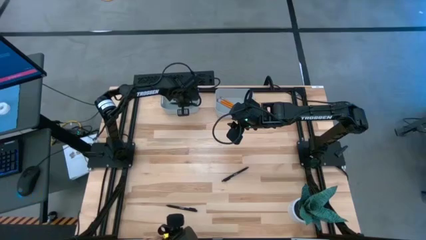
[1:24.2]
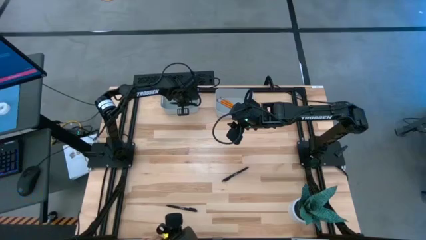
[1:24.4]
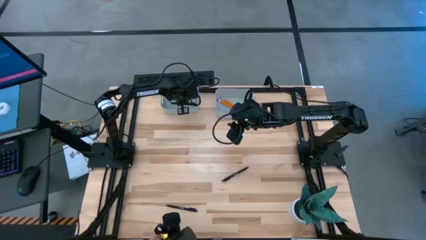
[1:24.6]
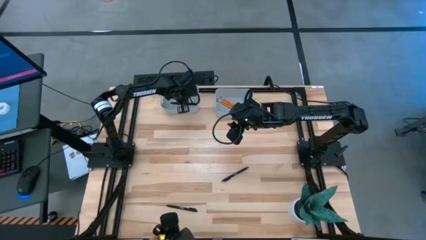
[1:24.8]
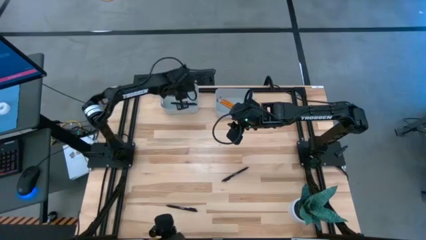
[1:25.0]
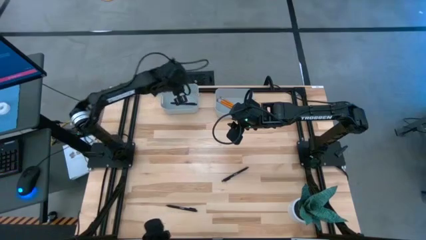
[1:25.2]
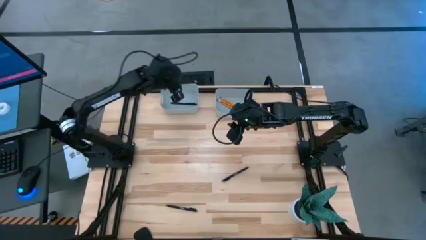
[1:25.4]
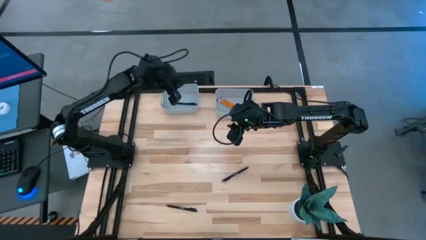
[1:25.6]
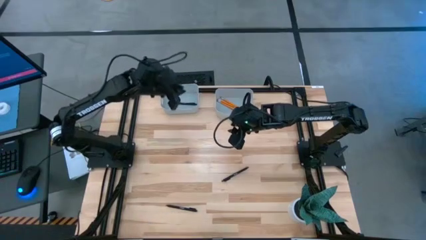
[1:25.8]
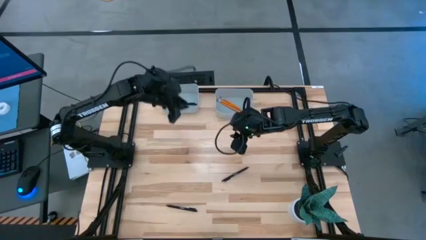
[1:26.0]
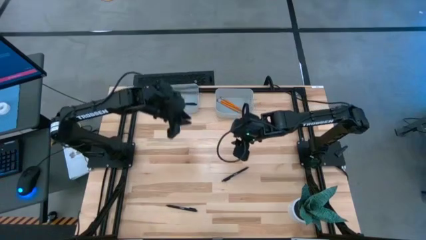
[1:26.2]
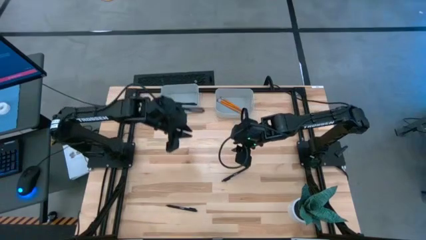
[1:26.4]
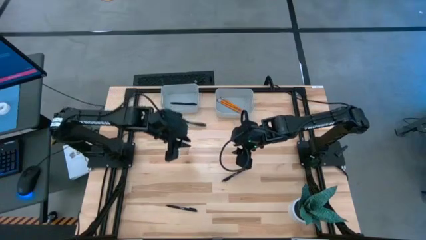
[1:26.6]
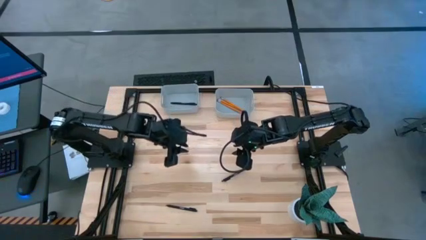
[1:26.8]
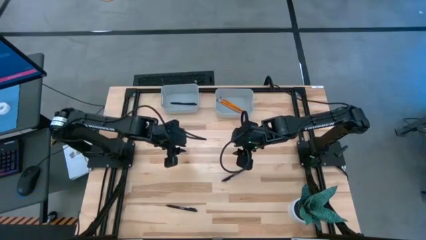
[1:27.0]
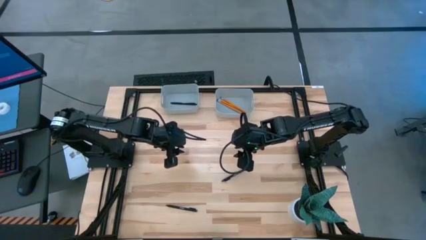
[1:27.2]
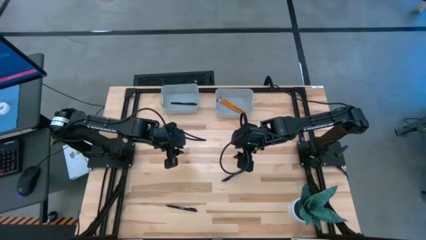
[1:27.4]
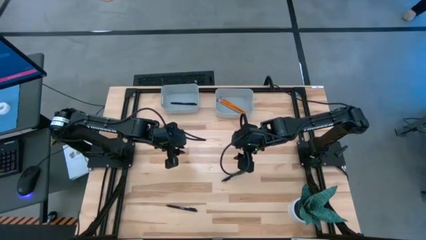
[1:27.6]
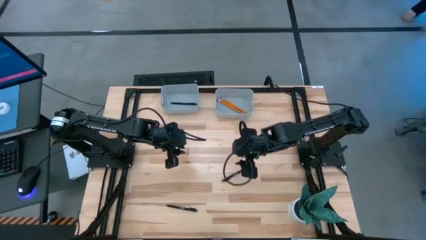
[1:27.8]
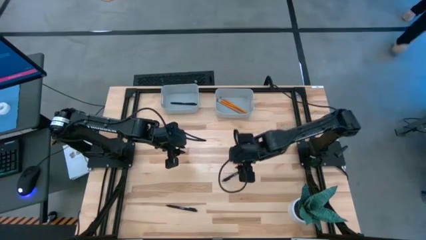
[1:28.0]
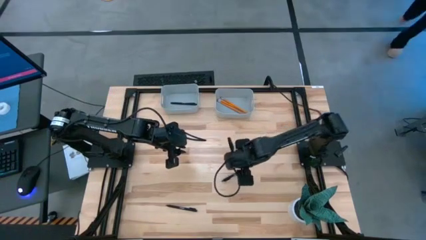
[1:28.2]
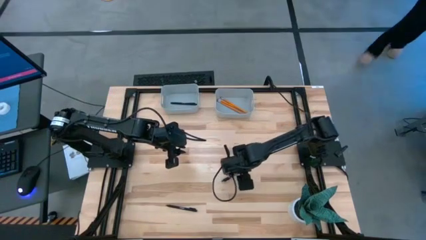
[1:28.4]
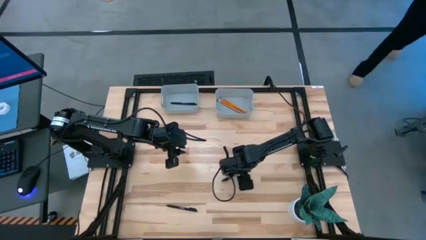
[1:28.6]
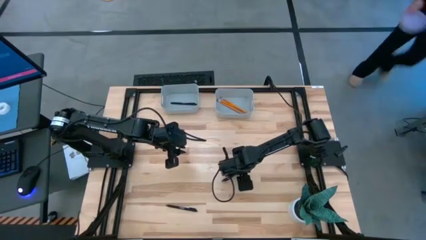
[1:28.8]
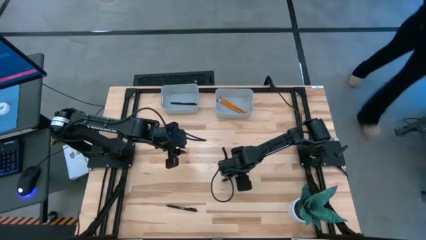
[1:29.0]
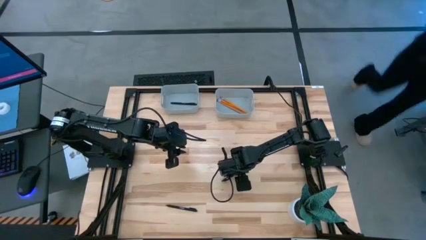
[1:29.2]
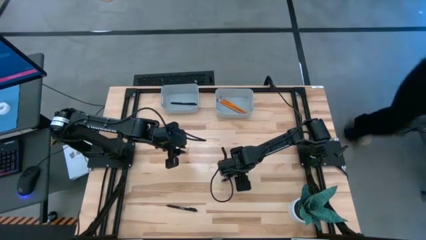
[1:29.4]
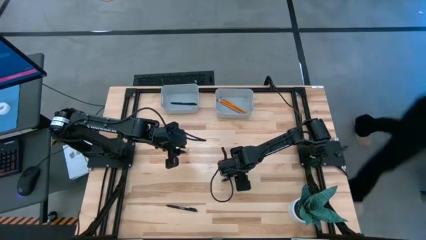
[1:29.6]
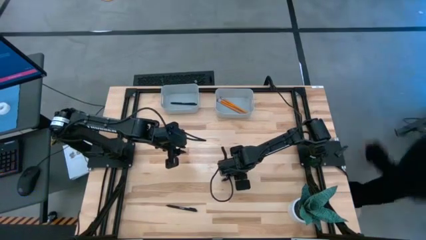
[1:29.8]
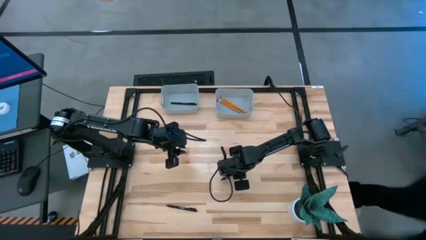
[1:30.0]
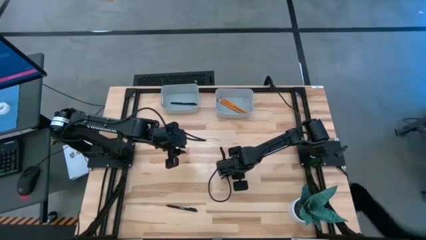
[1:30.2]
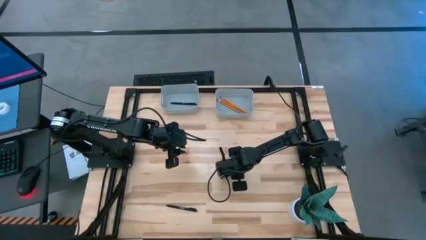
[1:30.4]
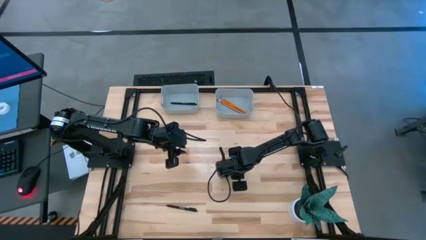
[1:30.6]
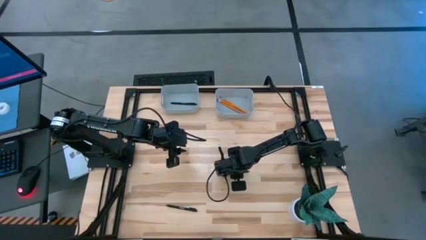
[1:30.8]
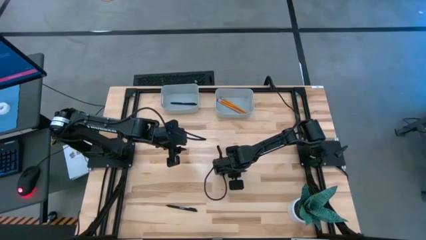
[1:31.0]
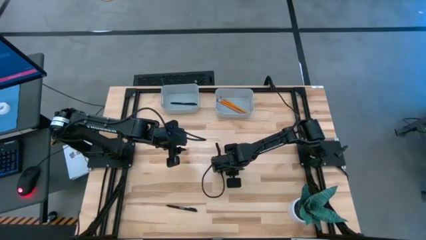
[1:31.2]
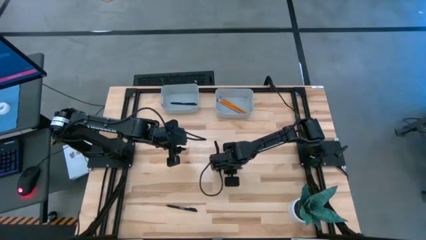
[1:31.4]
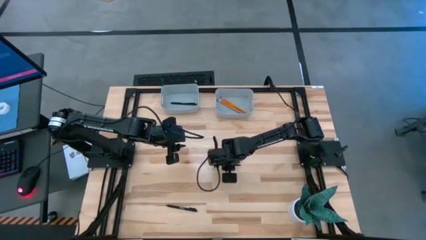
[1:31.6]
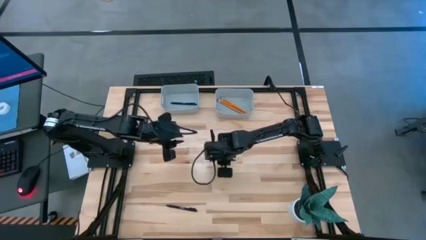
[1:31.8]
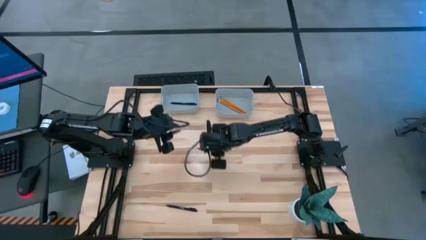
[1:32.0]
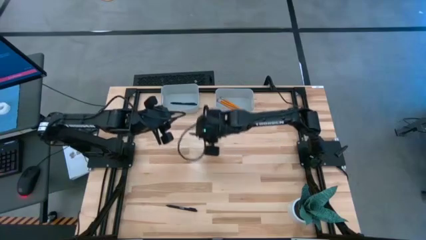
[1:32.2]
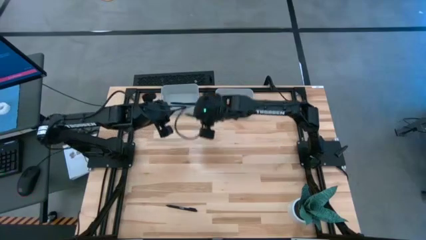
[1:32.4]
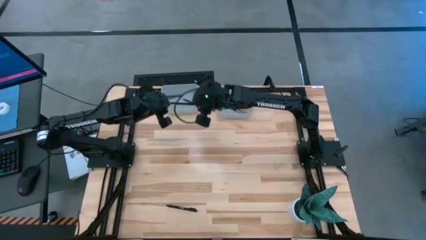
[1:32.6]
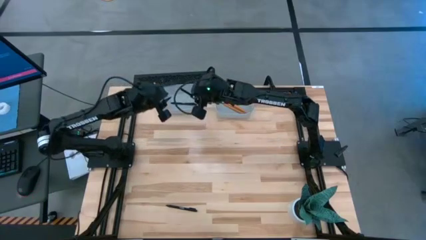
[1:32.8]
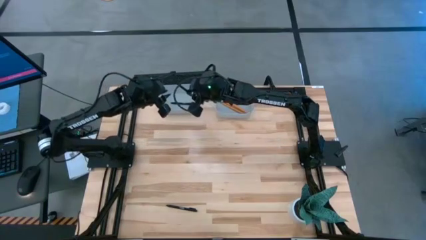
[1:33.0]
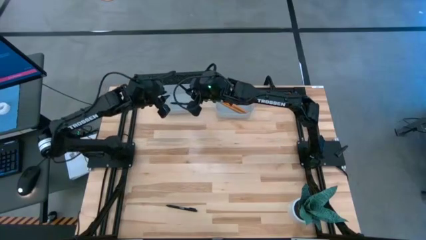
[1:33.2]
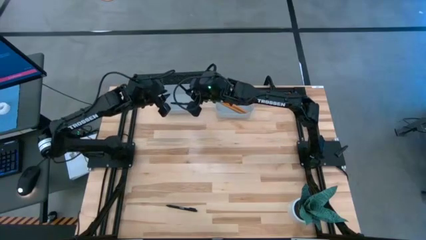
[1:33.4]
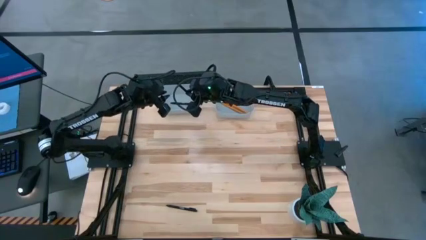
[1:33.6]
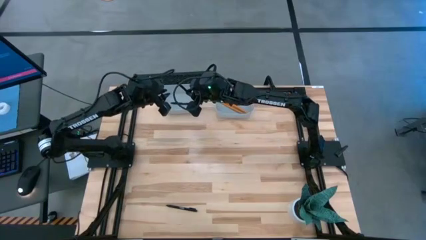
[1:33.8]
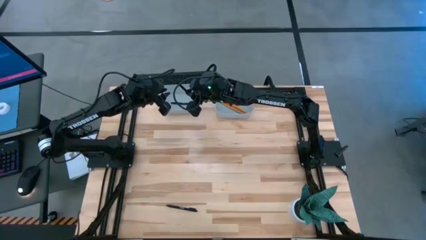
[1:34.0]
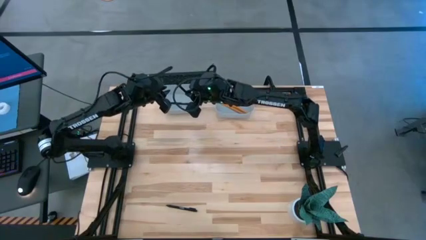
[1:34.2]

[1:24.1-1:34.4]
Task: Sort pens & pencils
Put the top black pen into the left gray bin

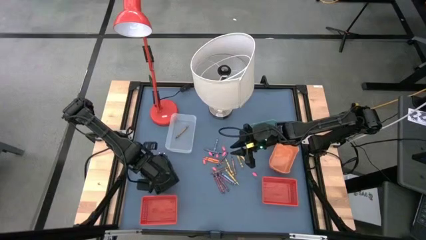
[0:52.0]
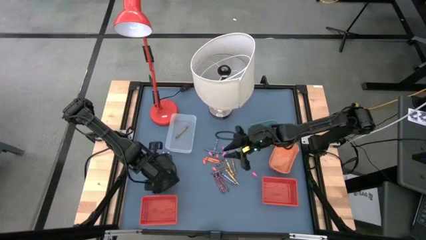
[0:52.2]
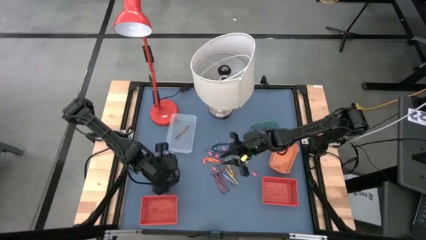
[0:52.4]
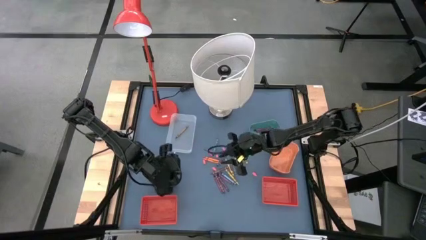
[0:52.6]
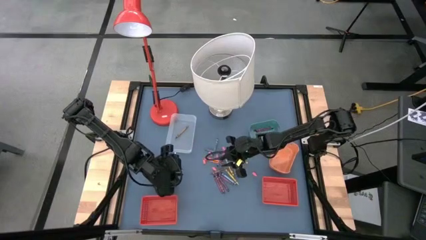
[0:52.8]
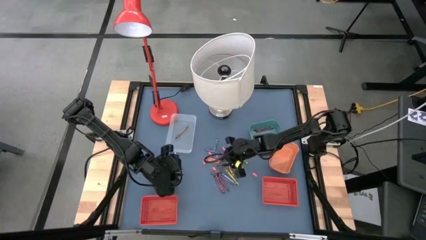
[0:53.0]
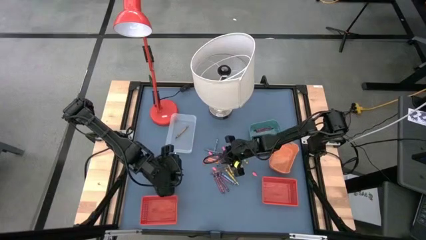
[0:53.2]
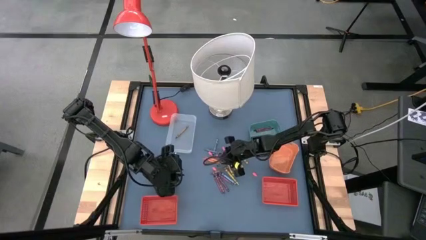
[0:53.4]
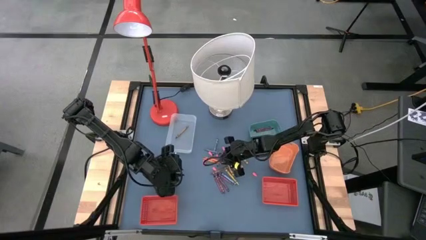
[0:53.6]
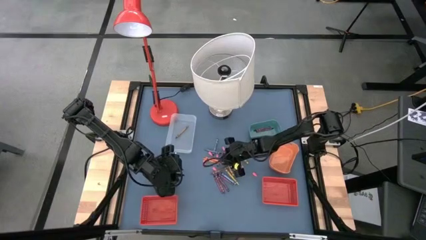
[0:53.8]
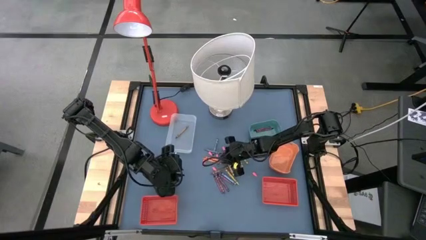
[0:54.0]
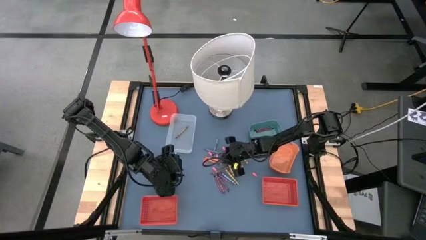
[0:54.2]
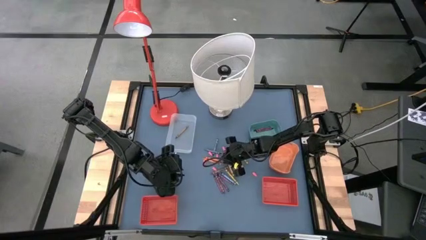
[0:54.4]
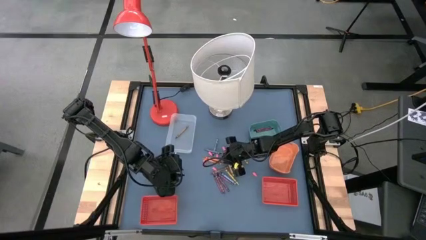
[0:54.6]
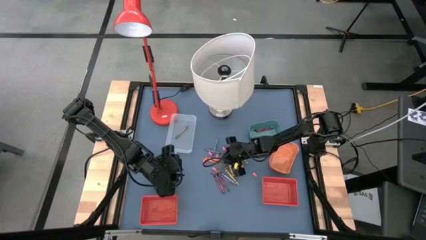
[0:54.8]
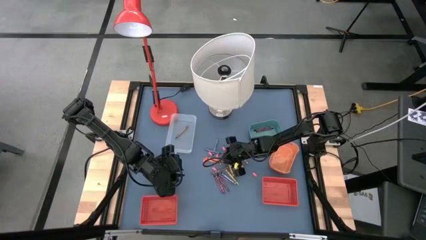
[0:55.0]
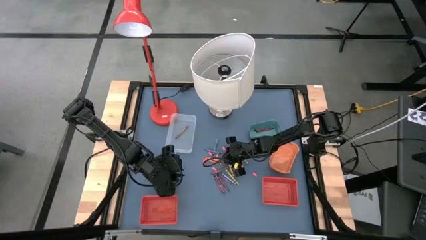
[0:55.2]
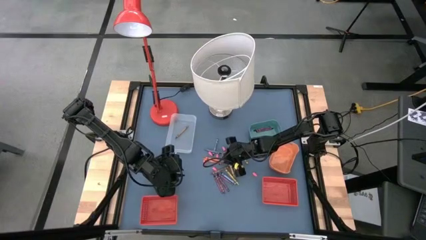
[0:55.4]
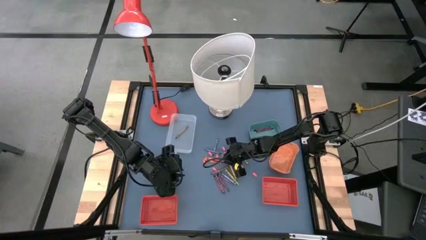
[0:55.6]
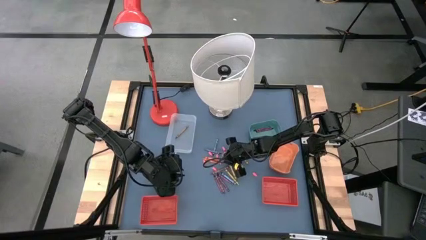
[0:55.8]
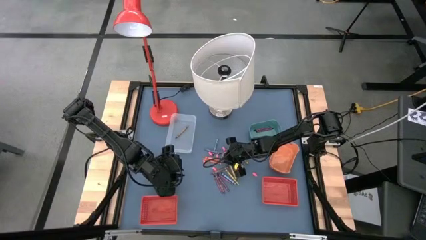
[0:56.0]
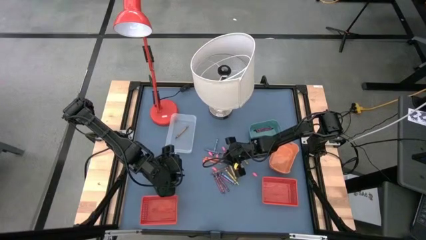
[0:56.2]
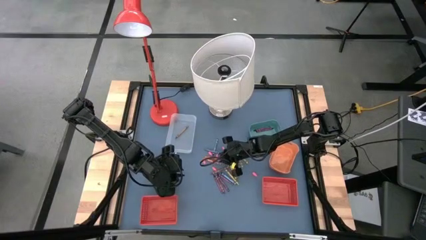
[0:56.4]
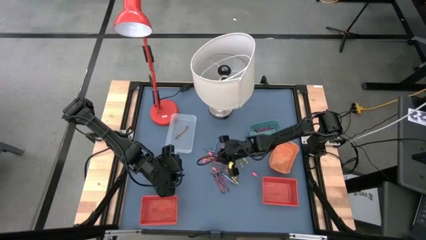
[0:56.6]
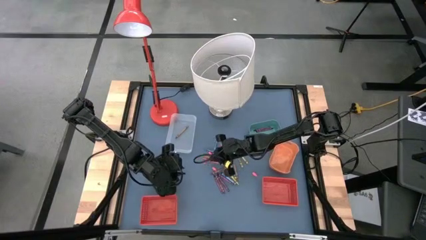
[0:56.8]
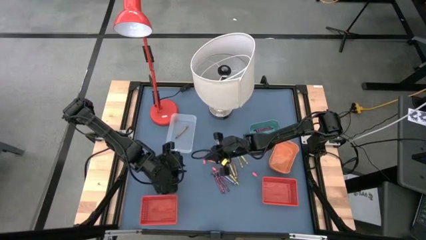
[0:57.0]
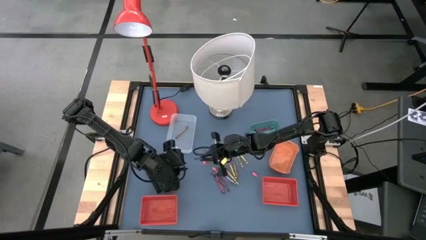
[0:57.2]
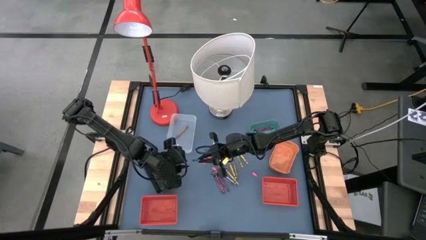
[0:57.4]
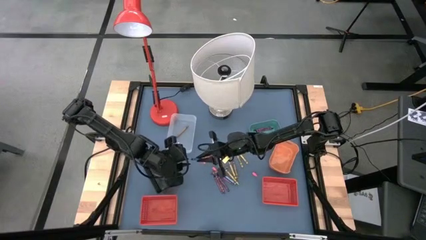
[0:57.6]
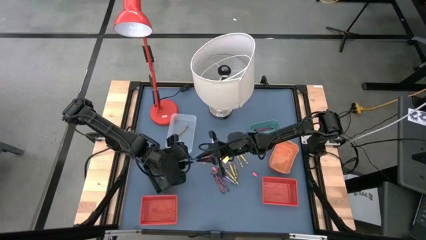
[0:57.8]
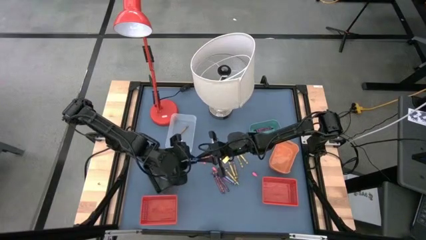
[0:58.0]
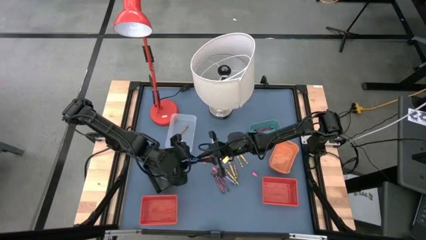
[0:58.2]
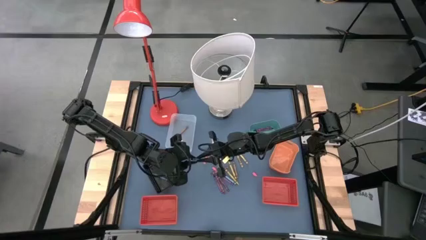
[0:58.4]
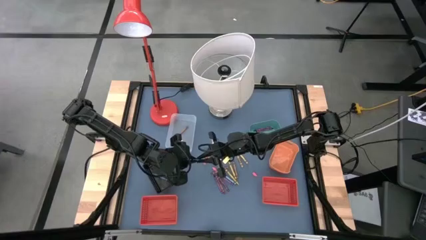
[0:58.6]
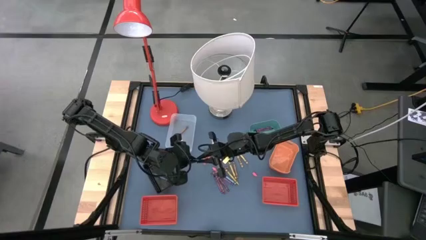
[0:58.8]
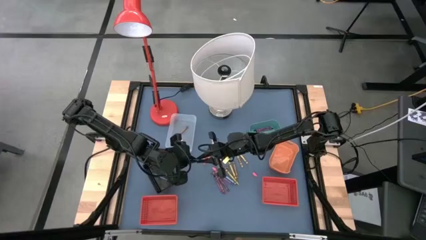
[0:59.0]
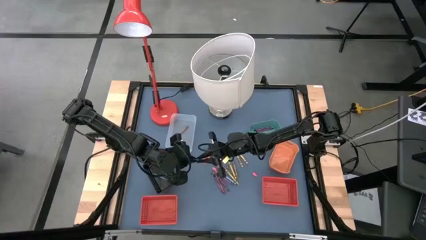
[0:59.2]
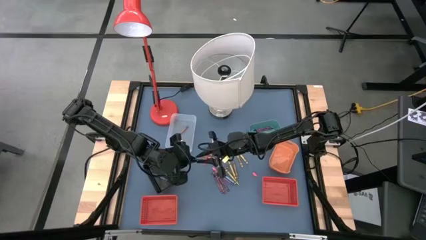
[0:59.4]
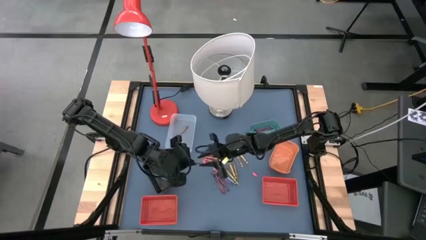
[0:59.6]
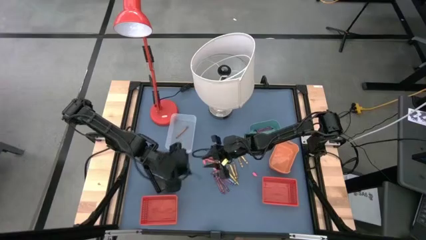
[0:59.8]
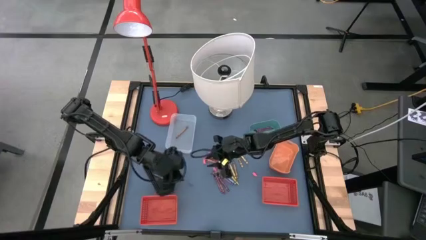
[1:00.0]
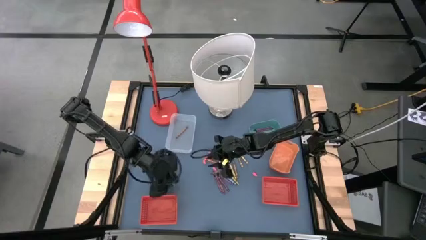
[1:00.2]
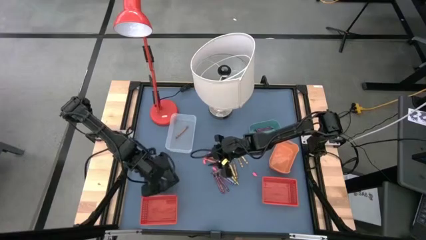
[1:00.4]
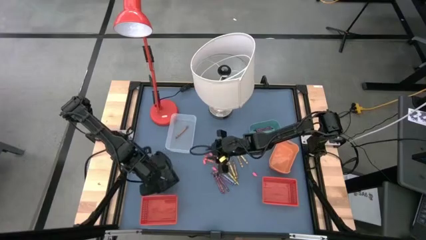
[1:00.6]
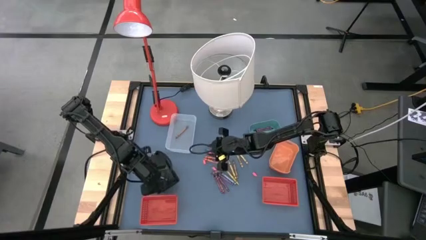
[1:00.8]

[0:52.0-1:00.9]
Task: Sort crayons
Put the dark blue crayon into the black bin
